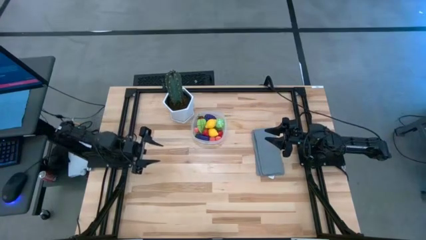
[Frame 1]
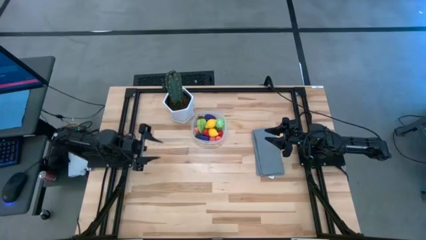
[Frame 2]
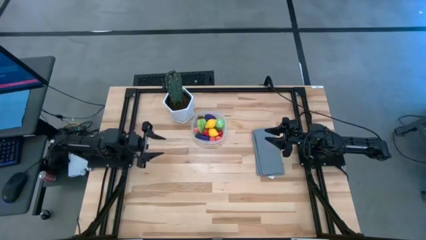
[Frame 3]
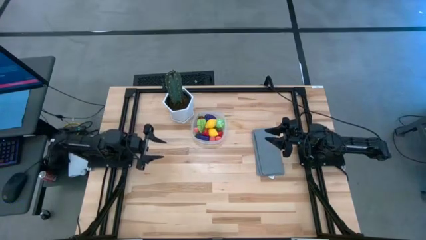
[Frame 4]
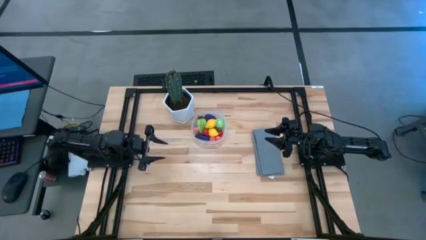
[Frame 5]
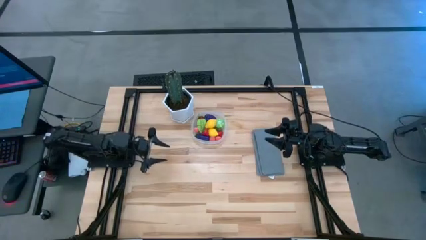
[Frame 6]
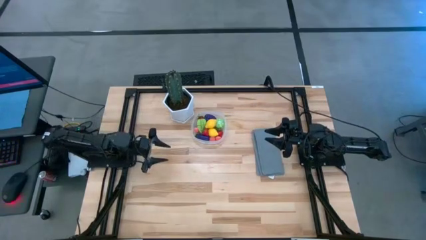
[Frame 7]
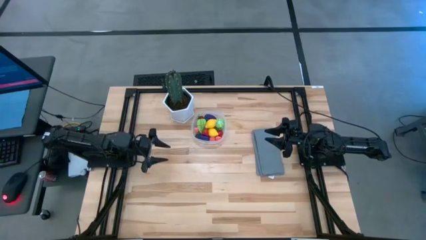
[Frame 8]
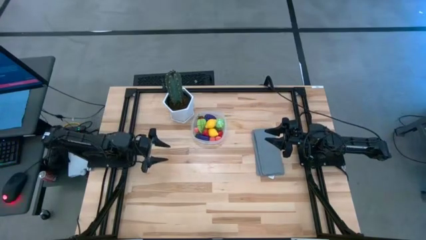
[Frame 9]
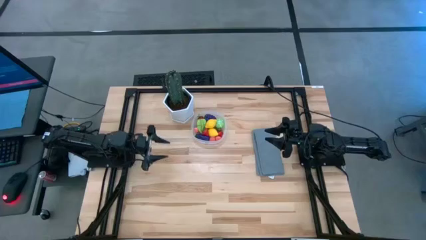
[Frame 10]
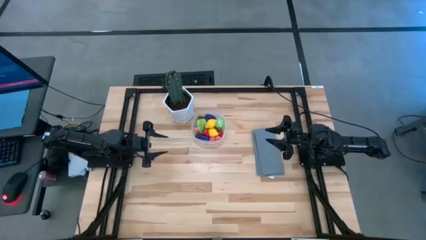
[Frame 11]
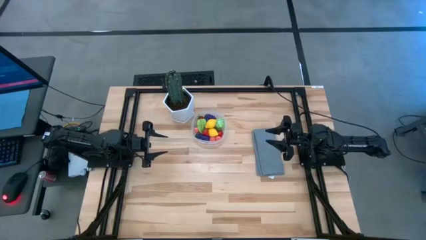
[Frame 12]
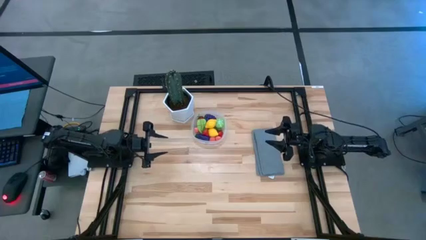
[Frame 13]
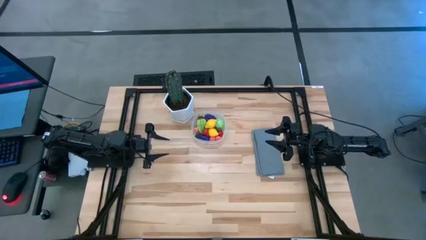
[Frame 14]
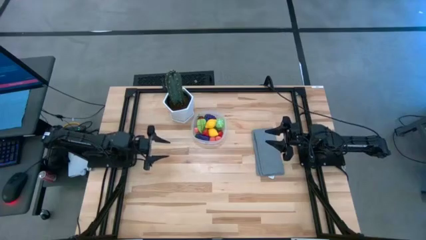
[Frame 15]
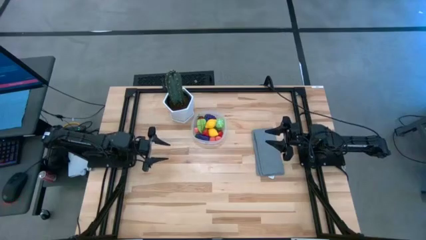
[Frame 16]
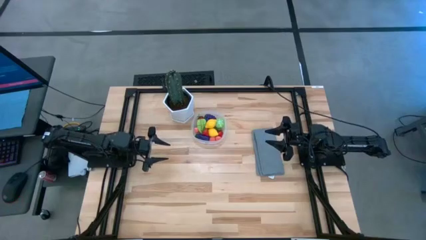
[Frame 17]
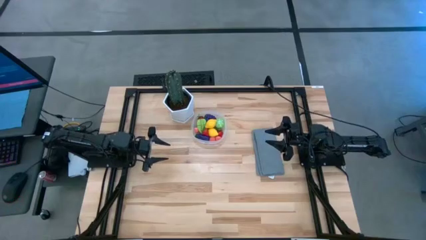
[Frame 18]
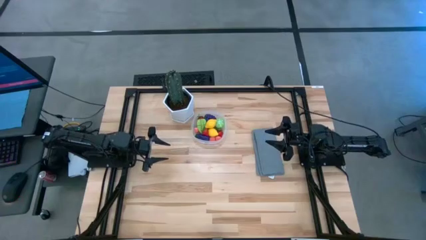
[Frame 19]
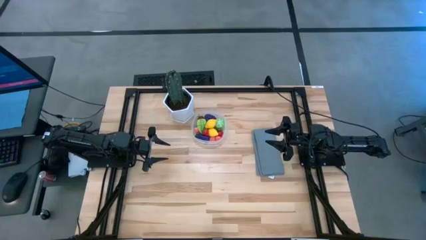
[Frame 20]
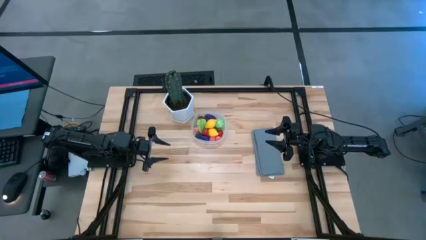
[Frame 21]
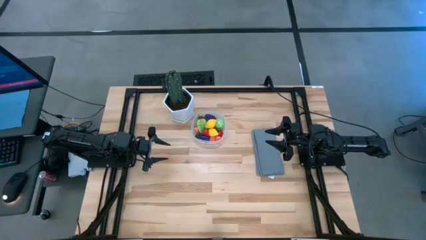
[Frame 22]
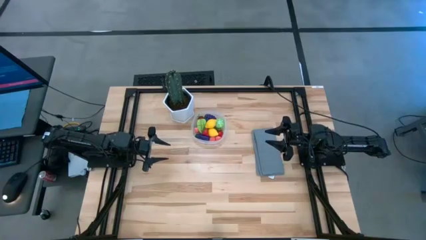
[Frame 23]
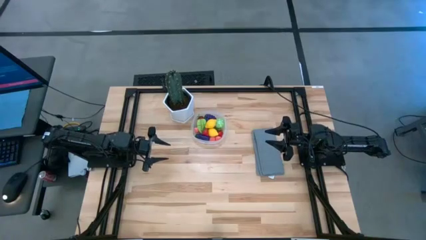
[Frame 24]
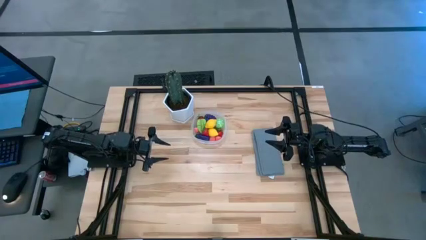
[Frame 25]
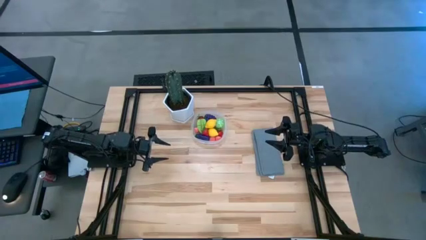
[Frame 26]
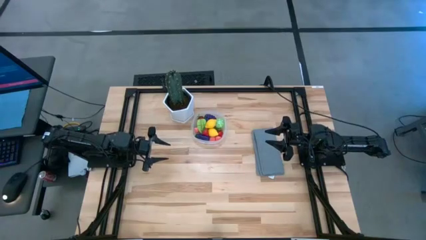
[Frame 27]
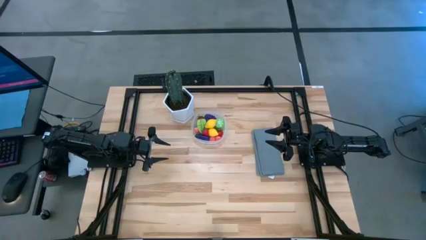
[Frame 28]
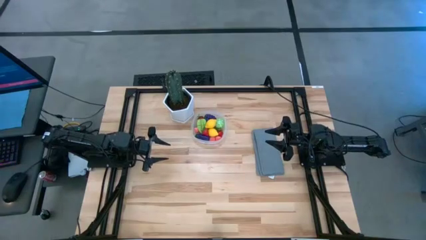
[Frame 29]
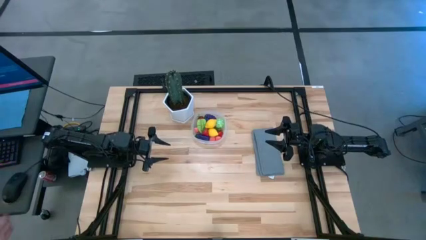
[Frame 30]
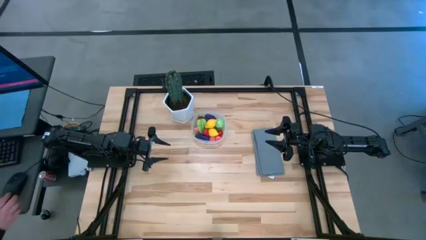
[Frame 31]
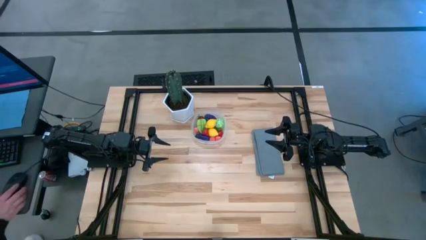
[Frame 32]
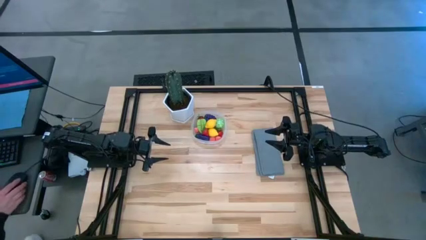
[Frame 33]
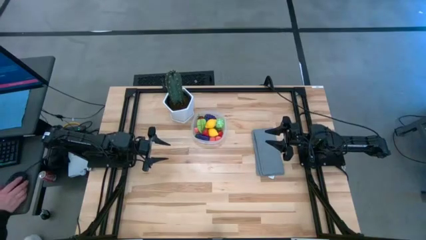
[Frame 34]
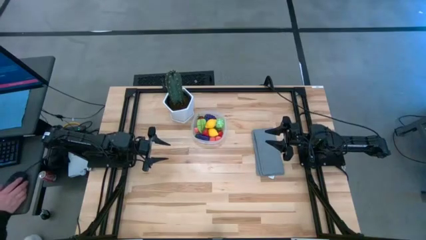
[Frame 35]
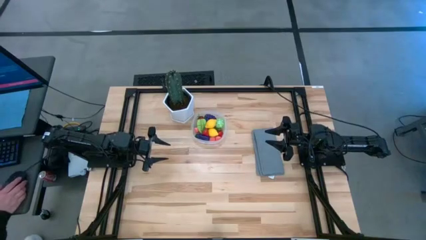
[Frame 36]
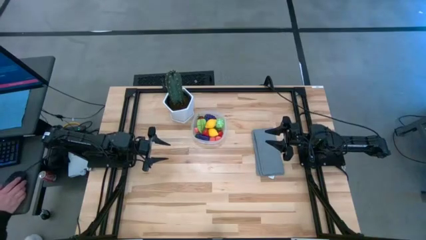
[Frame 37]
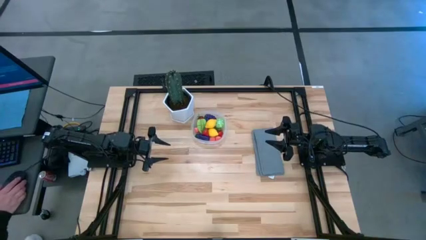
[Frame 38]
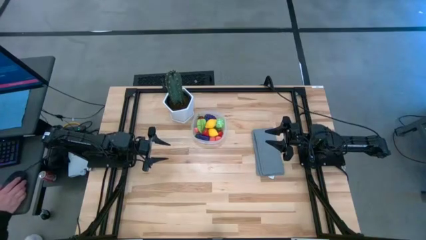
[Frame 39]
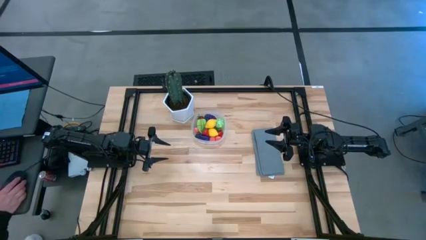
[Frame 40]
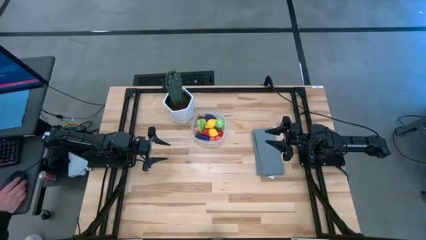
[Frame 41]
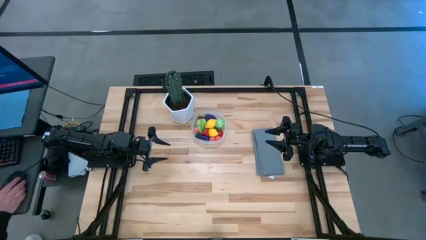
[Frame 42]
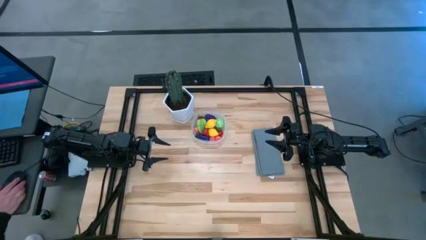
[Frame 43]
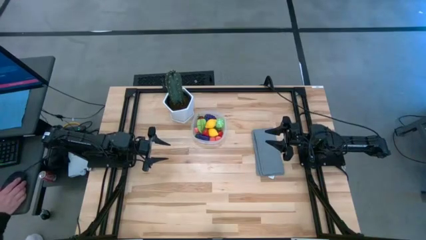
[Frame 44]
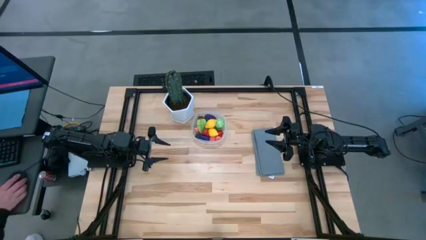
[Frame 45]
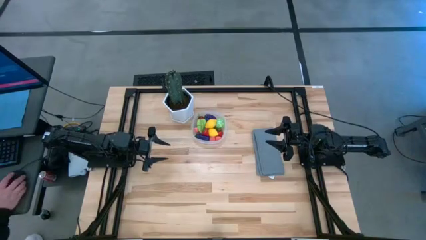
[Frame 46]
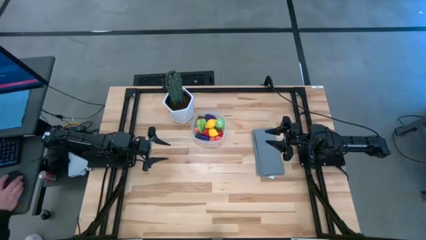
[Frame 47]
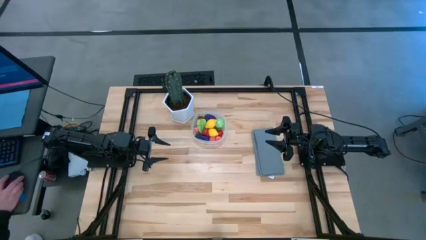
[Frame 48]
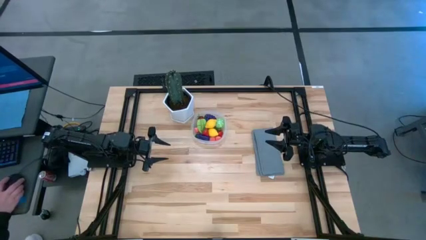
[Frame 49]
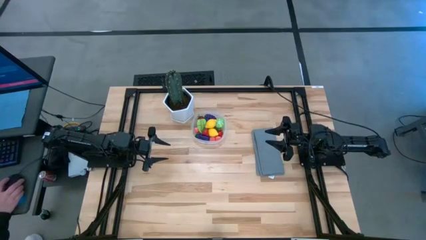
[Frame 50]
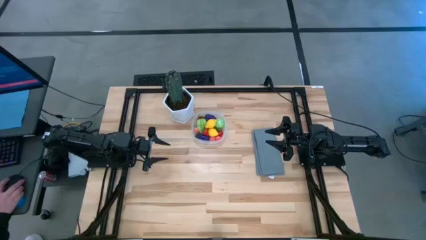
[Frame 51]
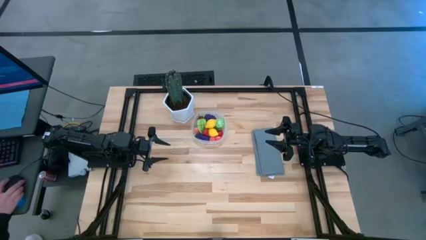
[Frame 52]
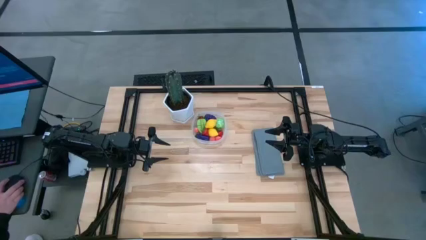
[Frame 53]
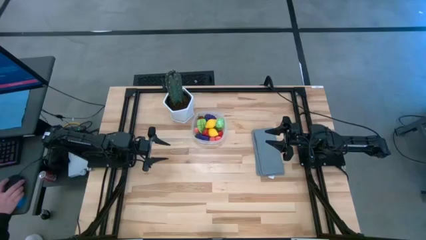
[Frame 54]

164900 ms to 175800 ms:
Task: Pick and placing Produce into tupperware
Return to Home Position

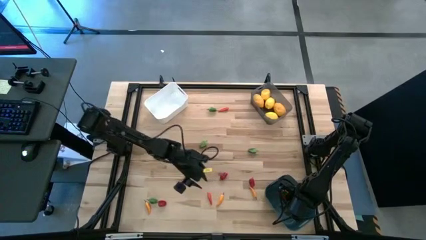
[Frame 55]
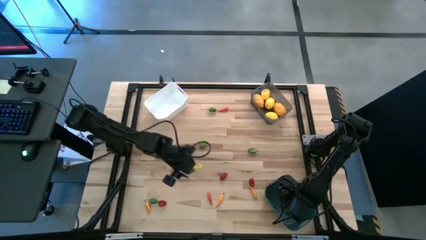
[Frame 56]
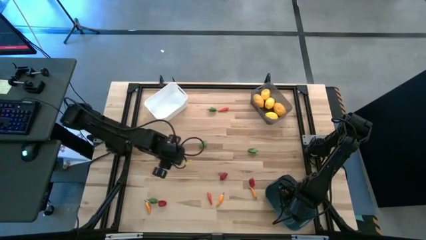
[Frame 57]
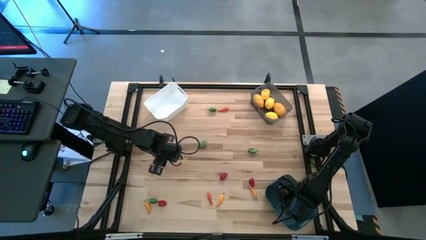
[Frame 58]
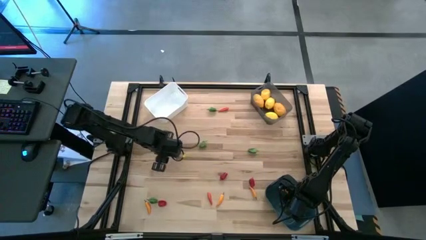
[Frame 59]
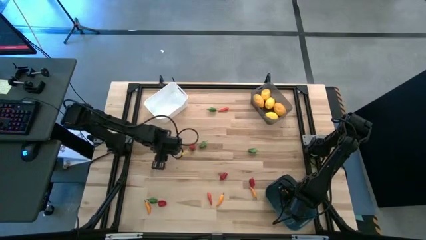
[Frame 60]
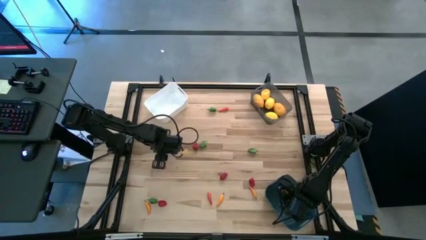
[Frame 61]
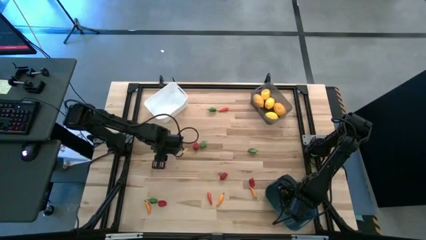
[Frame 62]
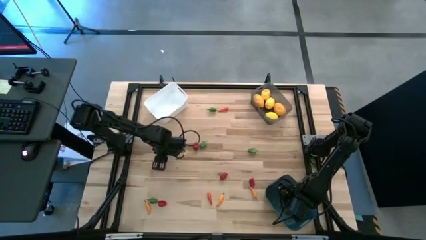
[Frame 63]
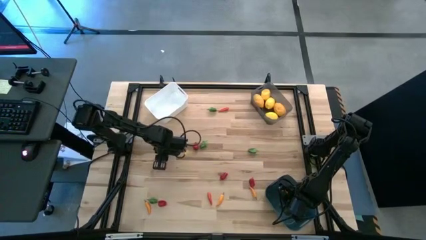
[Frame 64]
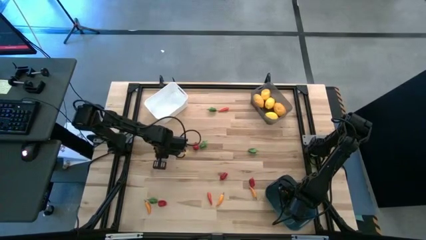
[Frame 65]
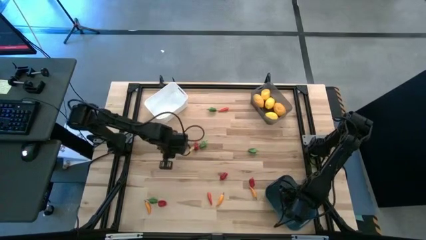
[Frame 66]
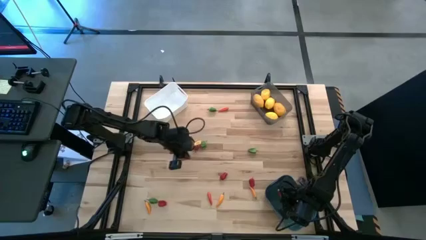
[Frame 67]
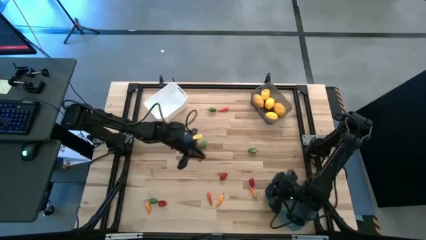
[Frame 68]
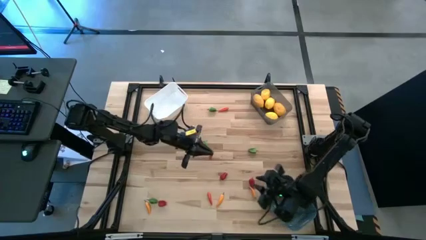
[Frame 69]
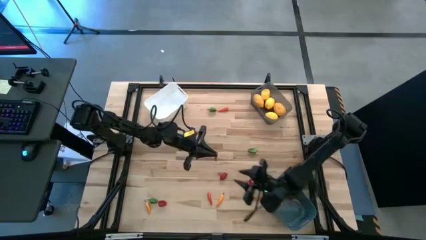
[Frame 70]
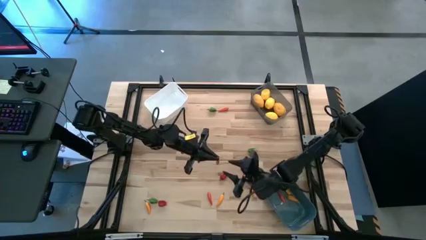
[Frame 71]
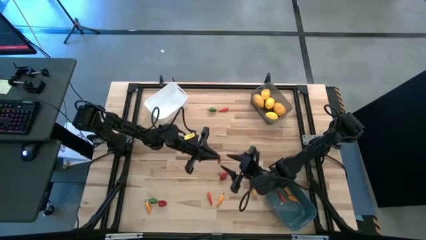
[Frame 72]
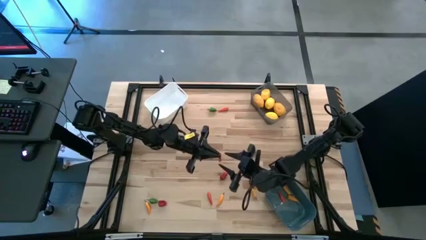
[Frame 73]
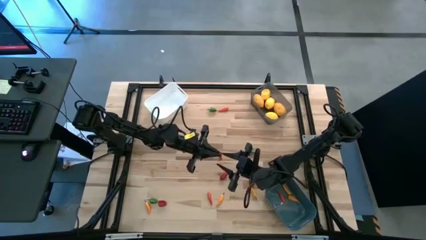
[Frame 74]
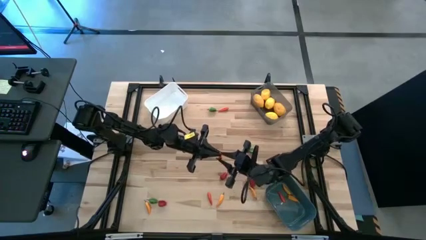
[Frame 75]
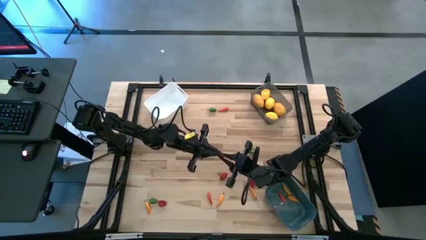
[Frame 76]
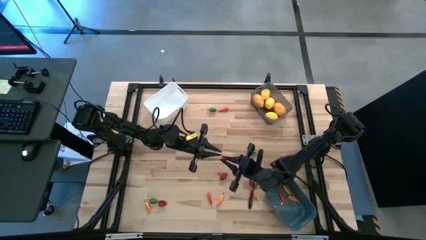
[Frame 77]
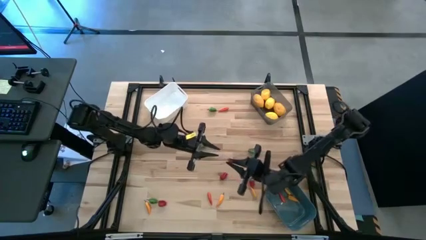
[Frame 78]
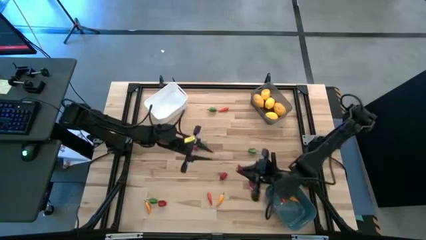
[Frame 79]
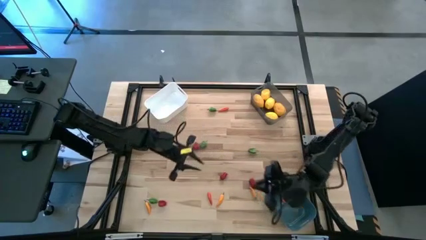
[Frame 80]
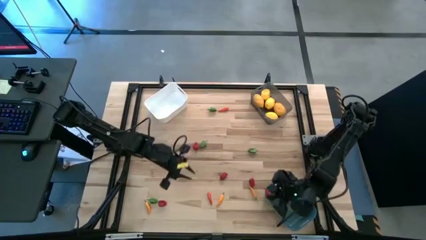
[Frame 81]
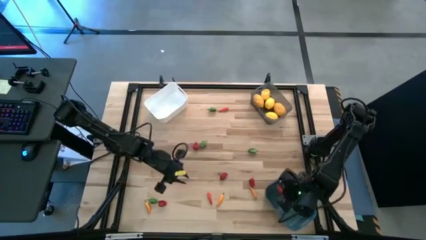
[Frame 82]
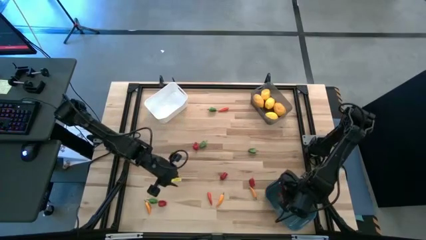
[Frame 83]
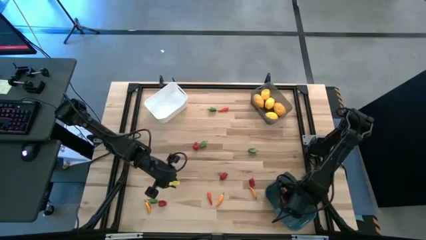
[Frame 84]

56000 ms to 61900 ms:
Task: Sort produce into baskets
Put the orange chili pepper into the blue bin
